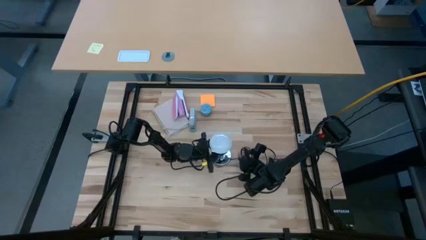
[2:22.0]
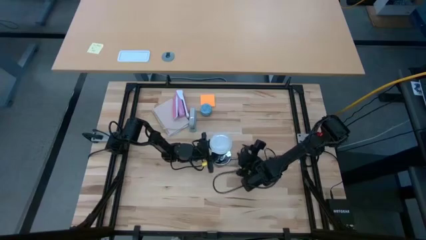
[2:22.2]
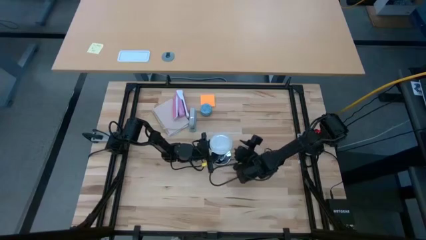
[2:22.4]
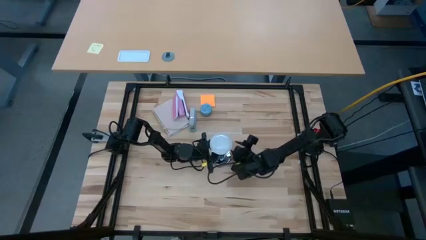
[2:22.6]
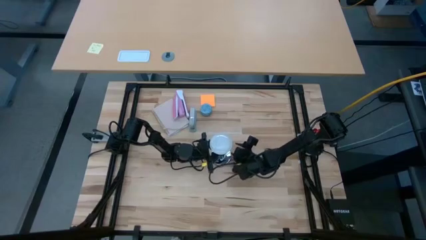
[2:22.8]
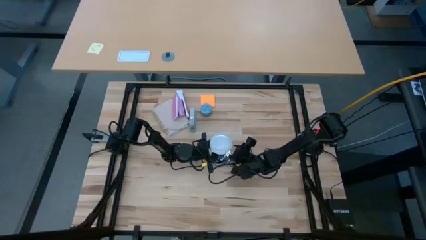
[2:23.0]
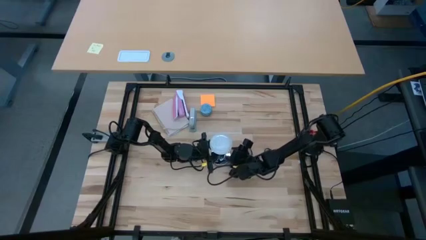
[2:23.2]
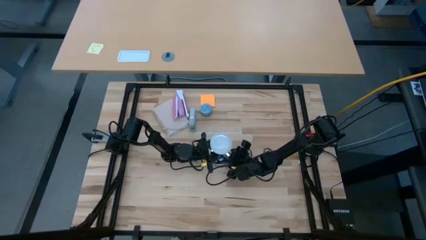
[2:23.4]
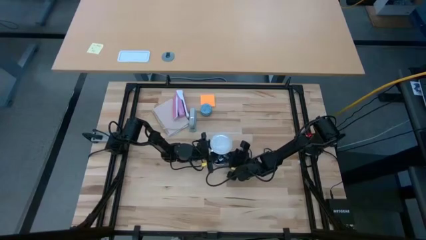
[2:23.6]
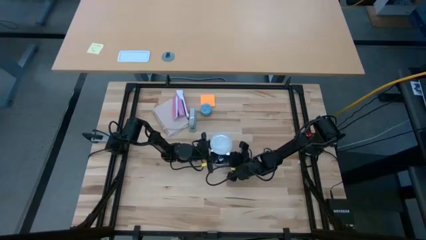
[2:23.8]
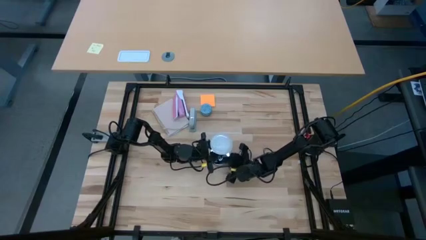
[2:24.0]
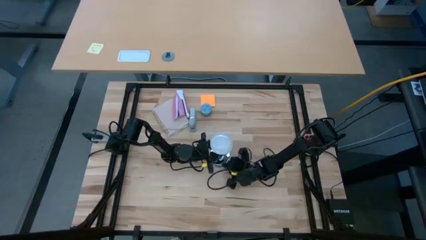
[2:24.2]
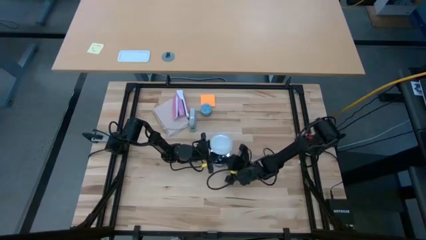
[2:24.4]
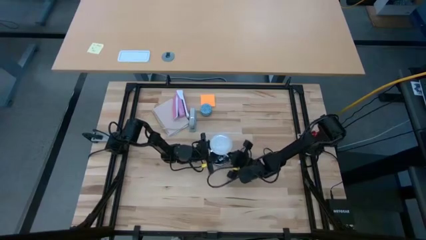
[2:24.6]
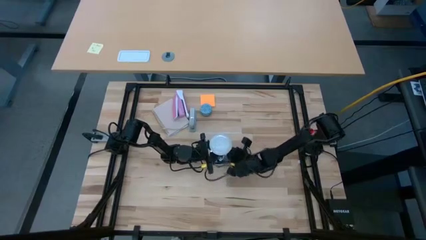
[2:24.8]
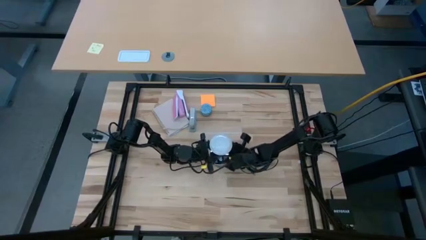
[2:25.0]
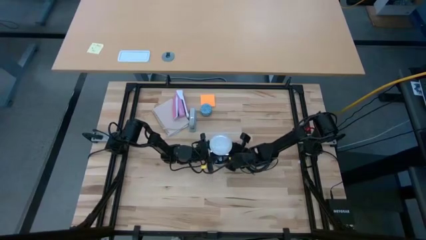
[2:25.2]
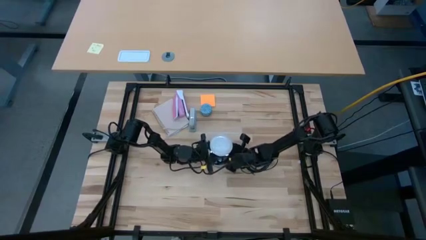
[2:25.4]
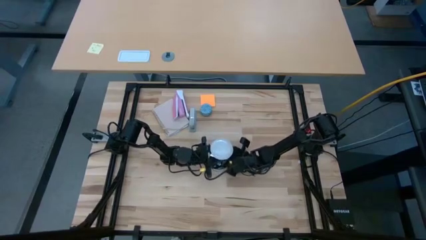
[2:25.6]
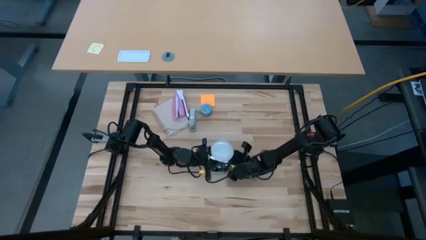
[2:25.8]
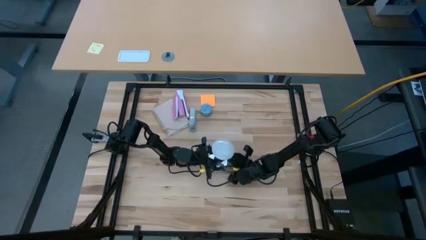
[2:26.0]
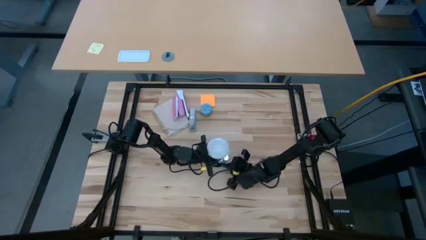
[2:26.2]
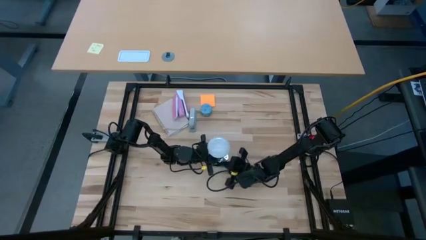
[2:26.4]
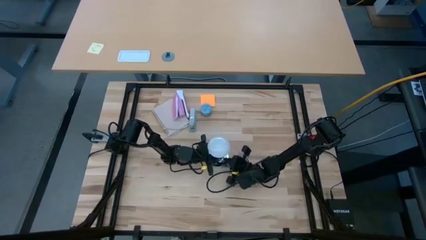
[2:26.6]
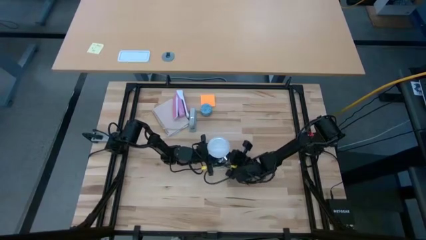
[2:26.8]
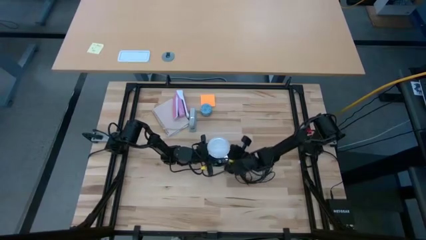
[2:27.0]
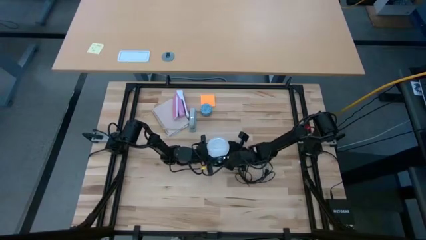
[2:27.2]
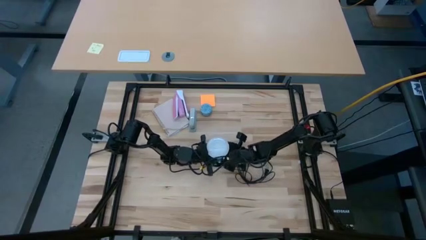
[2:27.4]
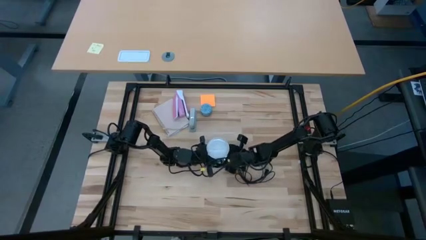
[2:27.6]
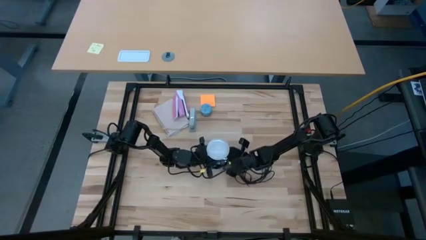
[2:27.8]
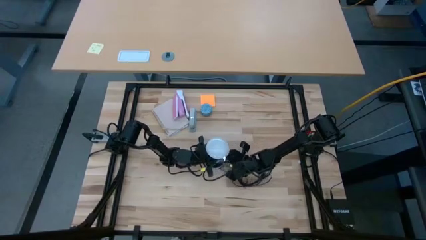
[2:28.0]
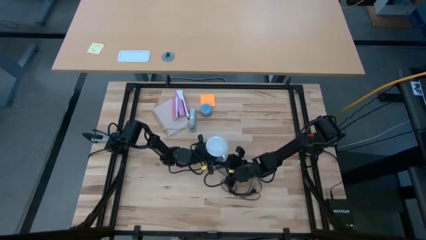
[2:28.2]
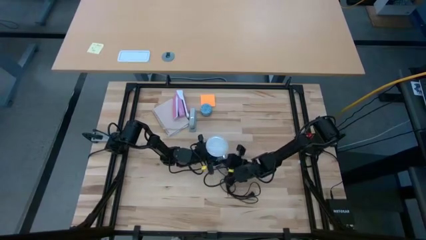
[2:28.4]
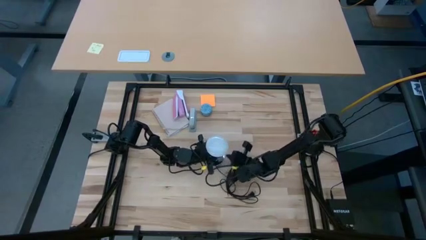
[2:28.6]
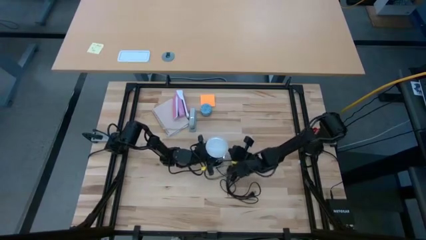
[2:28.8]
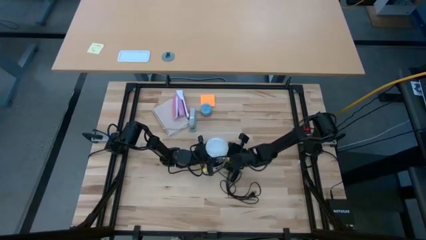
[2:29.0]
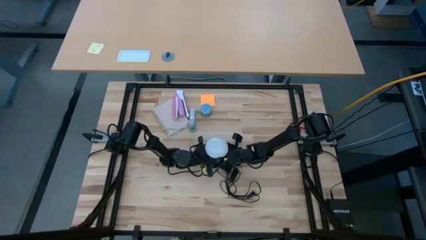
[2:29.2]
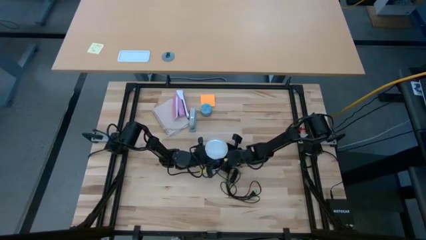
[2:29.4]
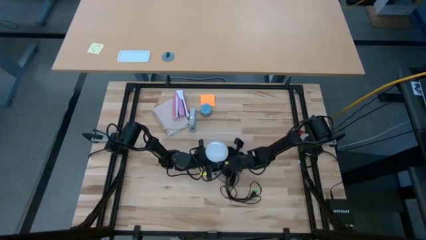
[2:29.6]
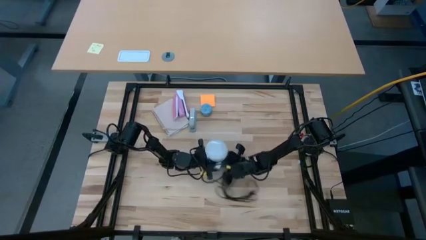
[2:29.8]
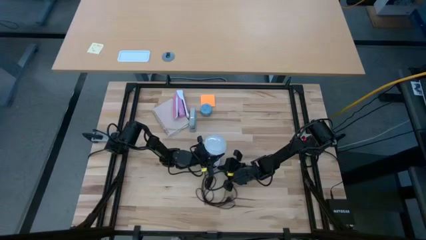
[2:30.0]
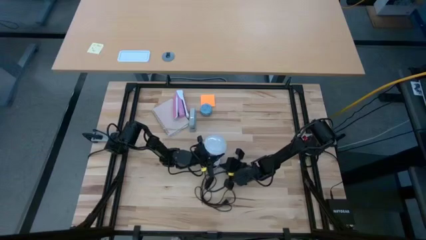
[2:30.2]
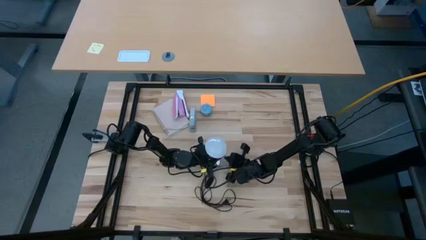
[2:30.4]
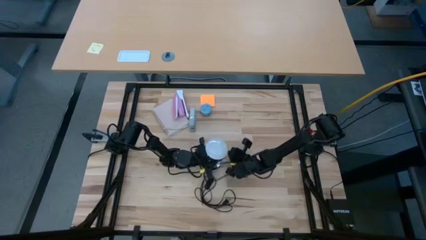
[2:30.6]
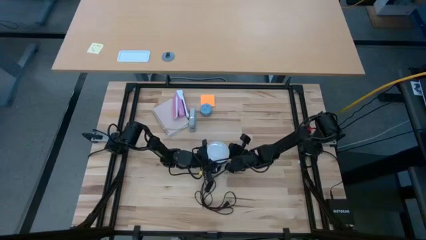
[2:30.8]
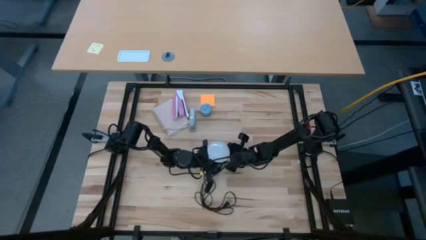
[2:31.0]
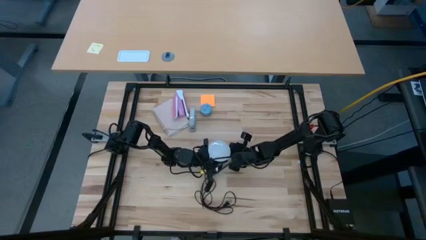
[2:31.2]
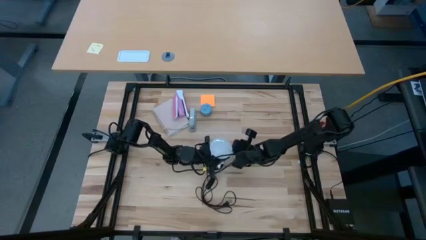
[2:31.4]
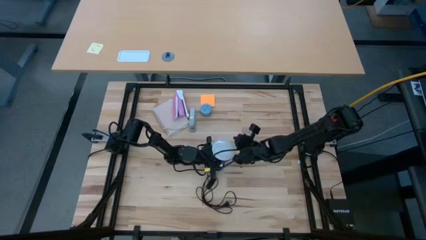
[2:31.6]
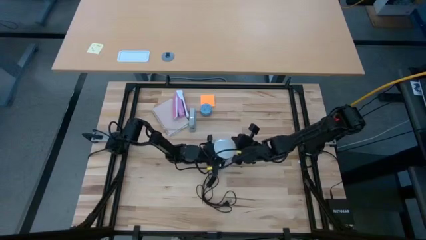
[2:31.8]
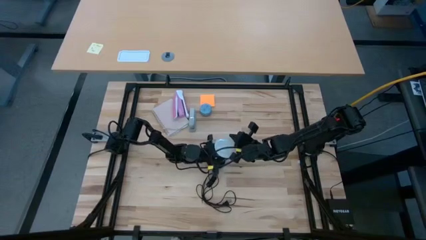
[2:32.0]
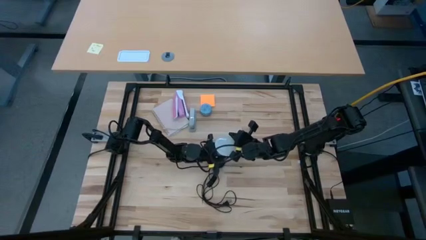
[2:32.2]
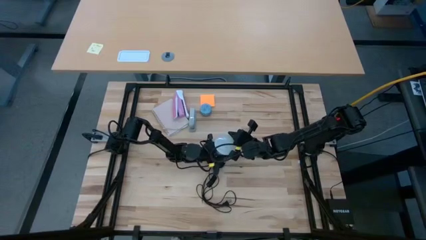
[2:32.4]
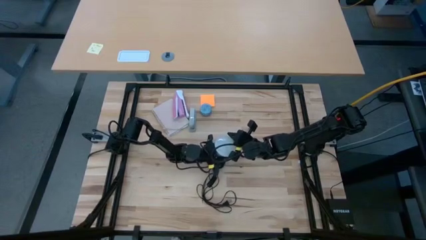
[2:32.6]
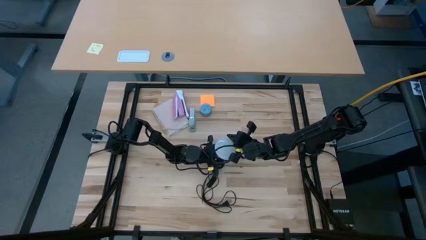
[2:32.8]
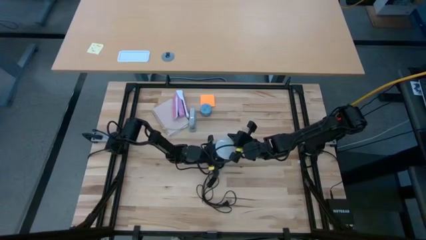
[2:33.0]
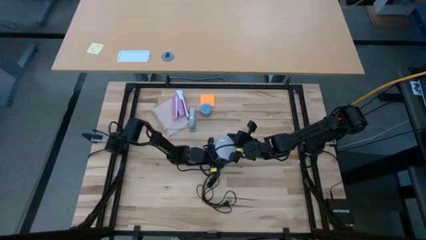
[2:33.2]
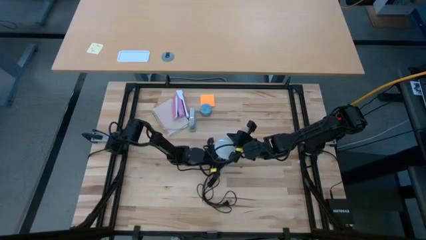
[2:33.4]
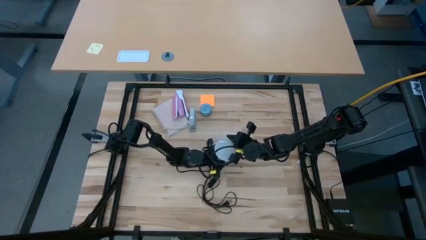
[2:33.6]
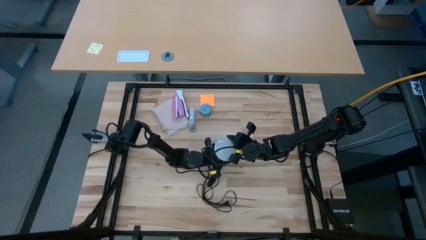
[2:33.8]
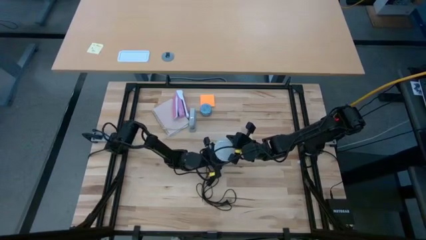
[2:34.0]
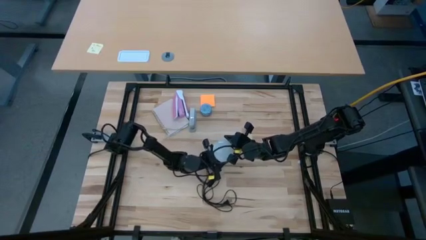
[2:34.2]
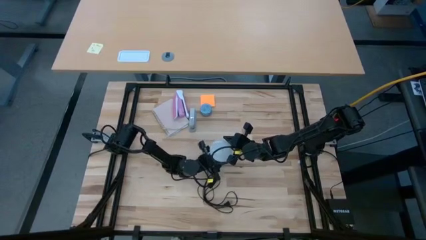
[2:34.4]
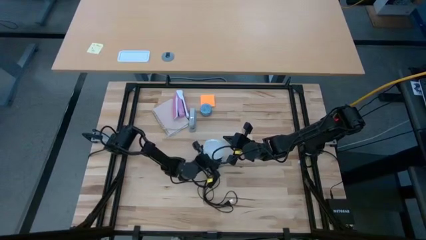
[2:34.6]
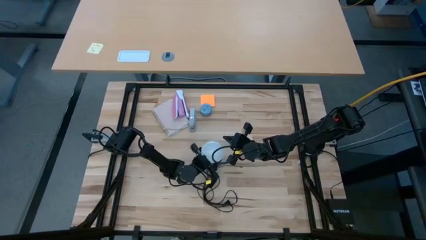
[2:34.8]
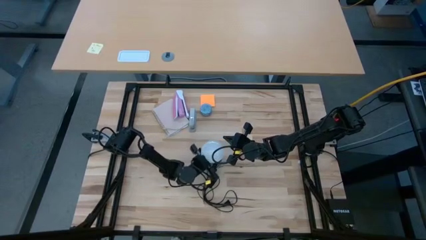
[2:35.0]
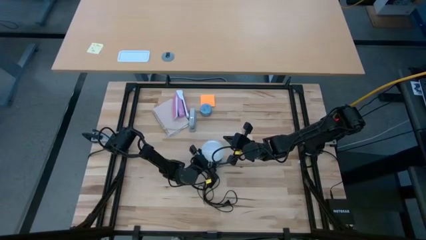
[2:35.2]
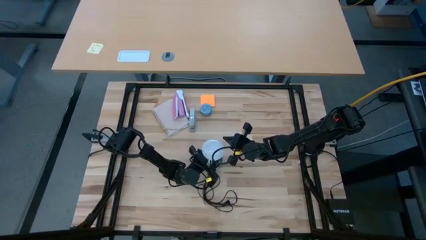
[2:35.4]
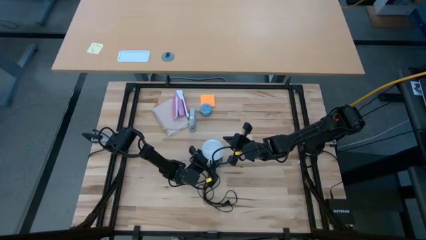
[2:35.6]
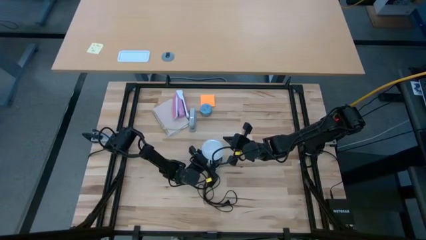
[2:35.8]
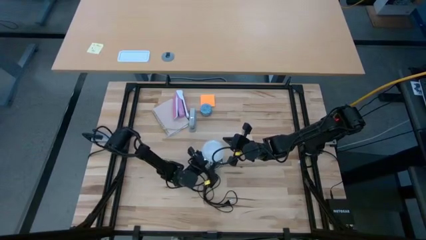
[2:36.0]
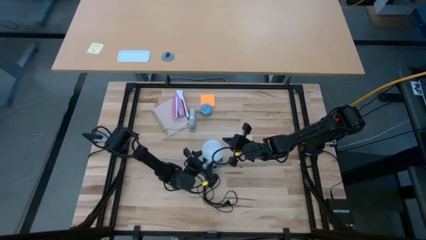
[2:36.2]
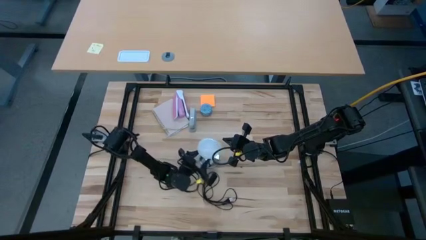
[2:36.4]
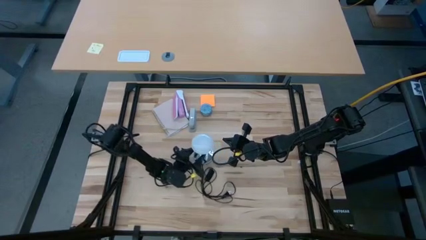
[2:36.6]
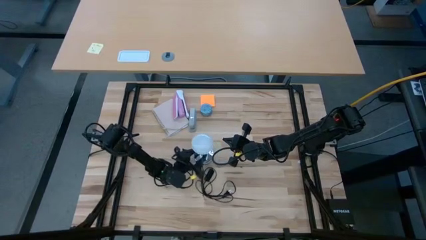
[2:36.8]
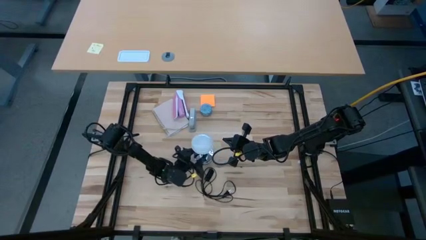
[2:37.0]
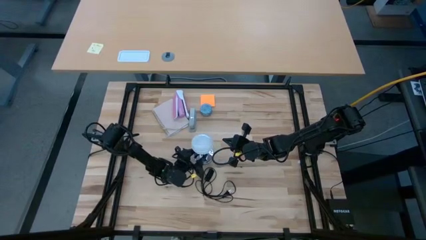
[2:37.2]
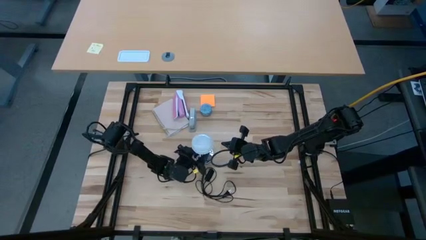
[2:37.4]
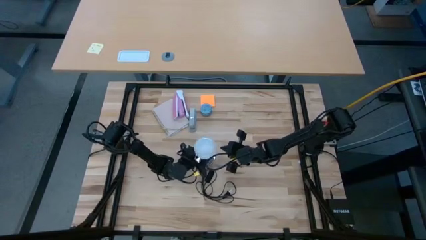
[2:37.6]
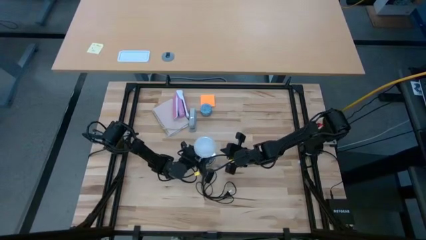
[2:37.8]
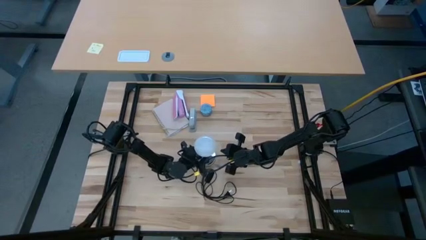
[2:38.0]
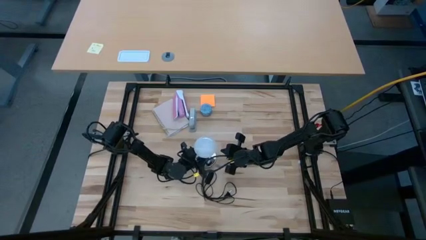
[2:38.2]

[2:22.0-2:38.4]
Task: Screw lightbulb
Remove the white lightbulb from the silver lamp
